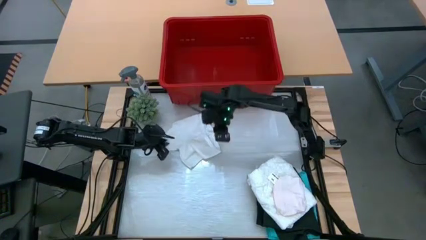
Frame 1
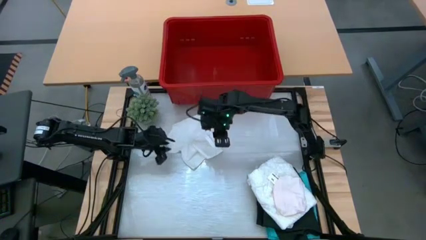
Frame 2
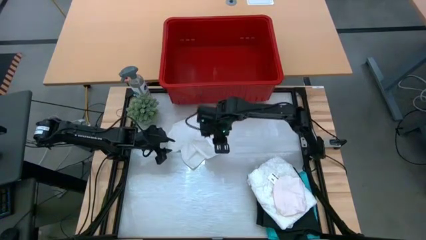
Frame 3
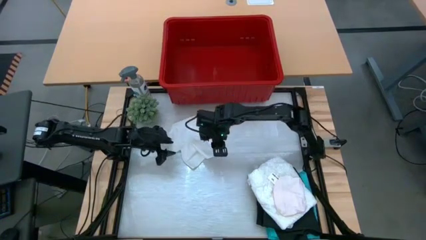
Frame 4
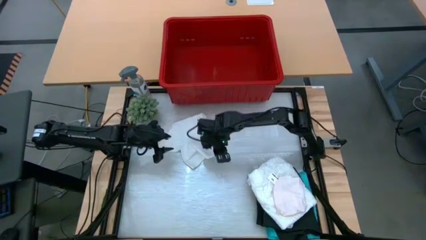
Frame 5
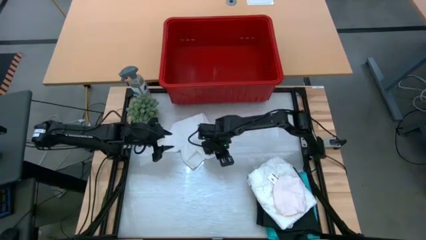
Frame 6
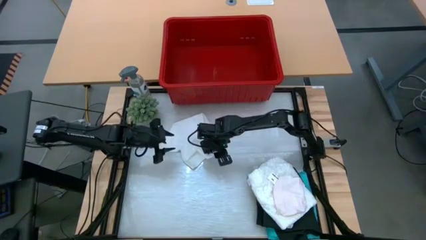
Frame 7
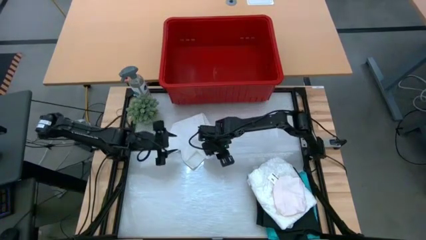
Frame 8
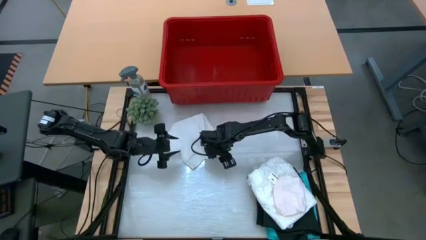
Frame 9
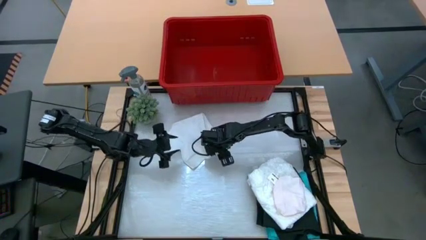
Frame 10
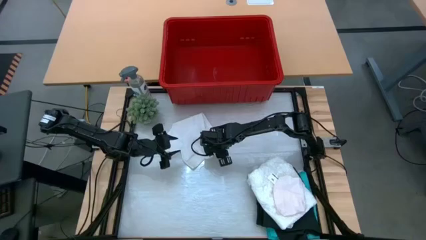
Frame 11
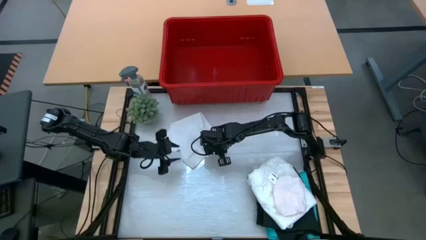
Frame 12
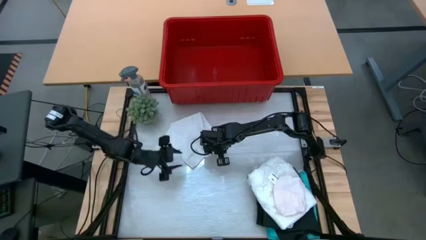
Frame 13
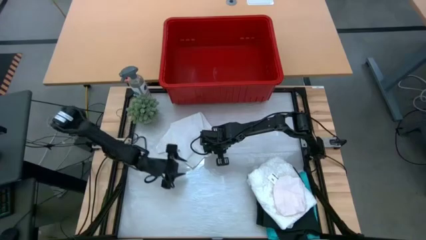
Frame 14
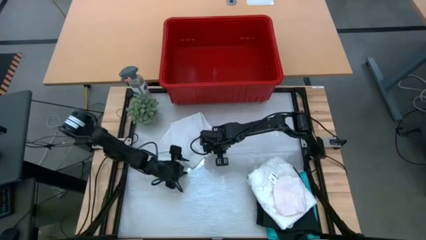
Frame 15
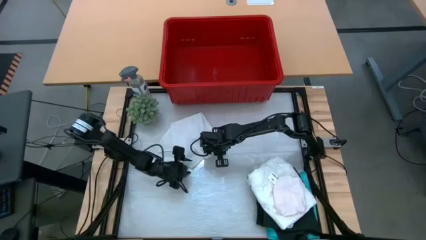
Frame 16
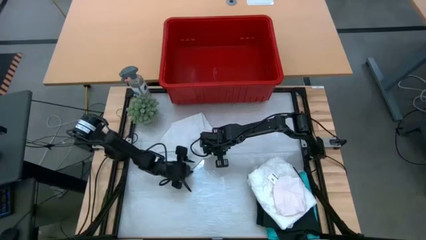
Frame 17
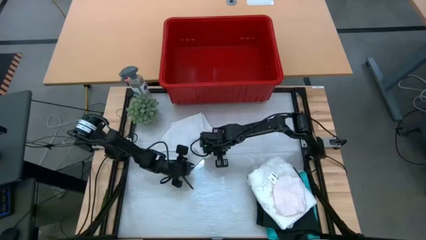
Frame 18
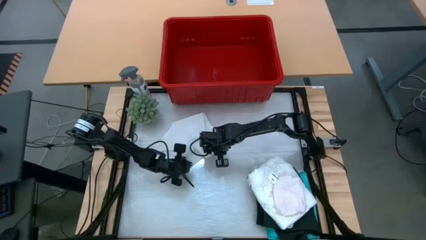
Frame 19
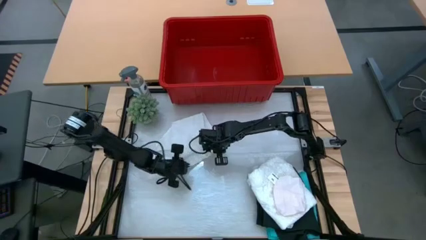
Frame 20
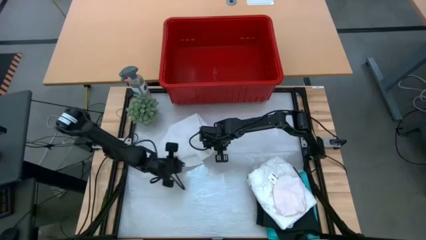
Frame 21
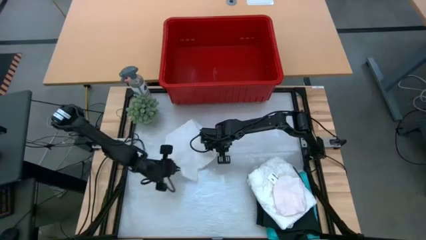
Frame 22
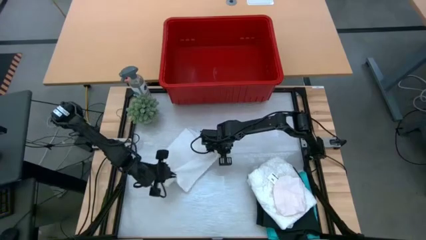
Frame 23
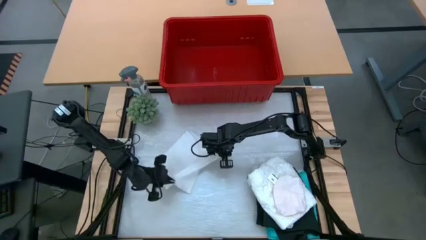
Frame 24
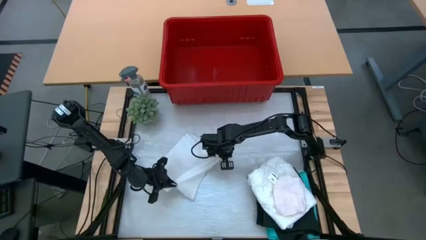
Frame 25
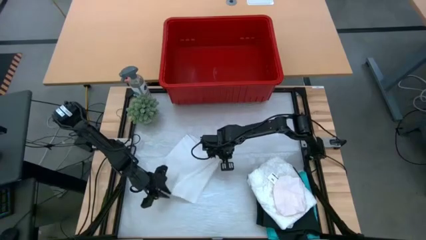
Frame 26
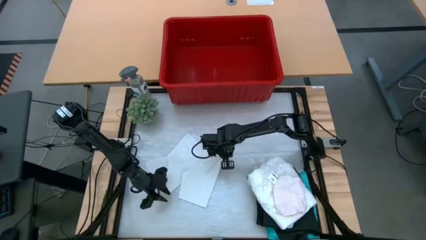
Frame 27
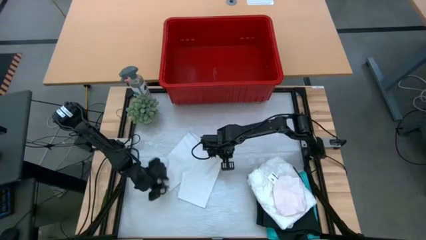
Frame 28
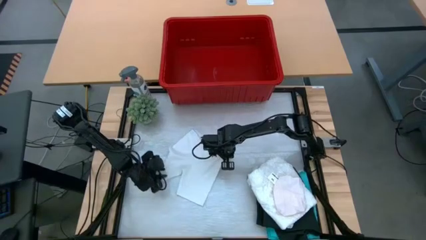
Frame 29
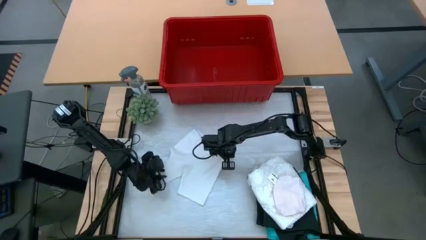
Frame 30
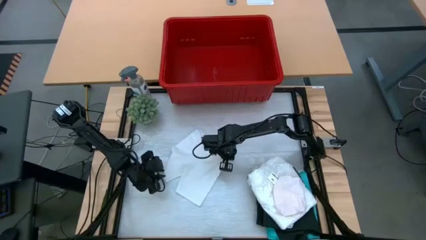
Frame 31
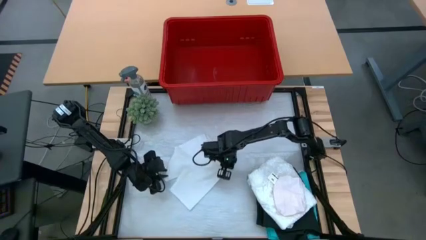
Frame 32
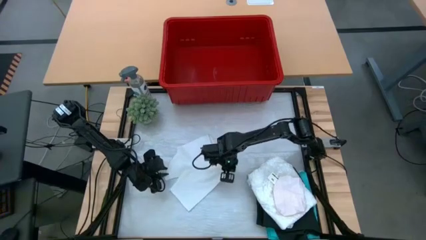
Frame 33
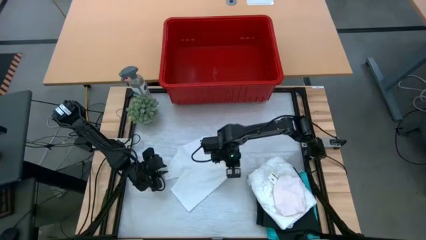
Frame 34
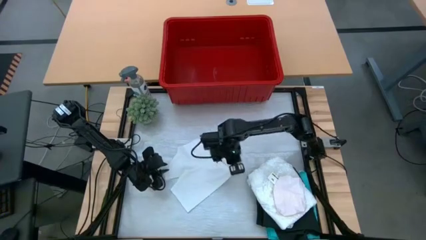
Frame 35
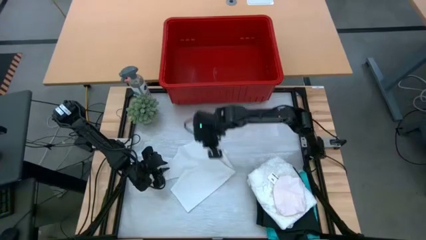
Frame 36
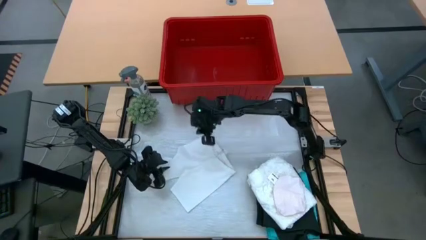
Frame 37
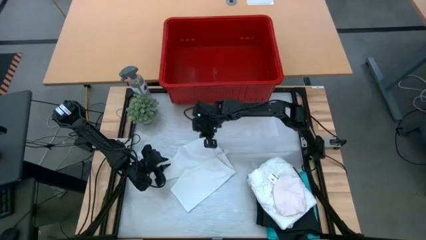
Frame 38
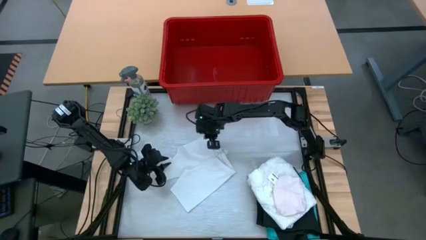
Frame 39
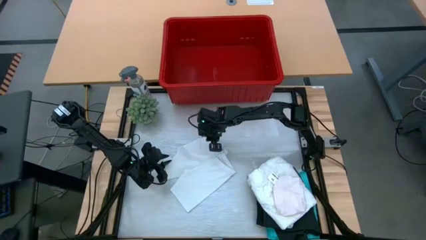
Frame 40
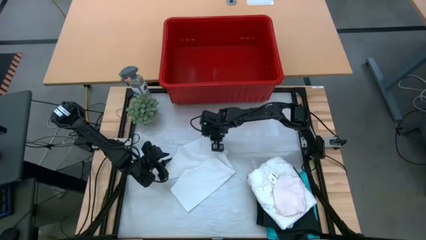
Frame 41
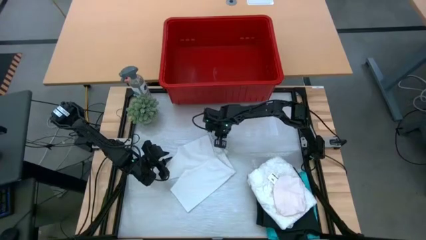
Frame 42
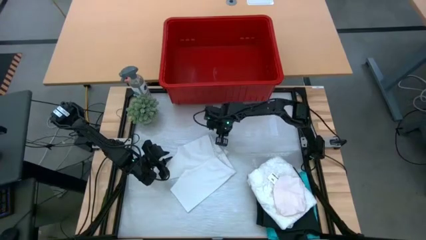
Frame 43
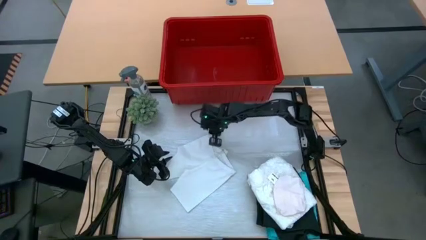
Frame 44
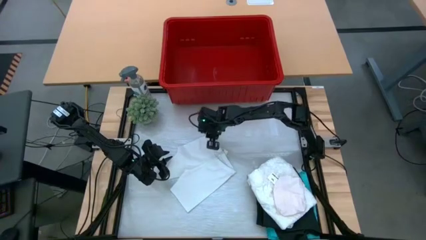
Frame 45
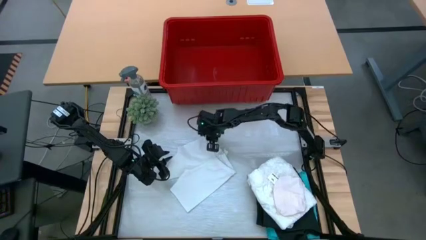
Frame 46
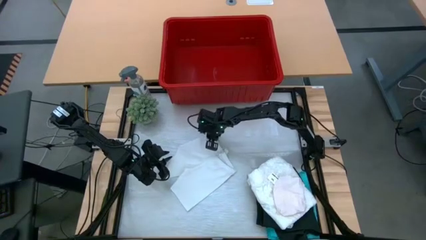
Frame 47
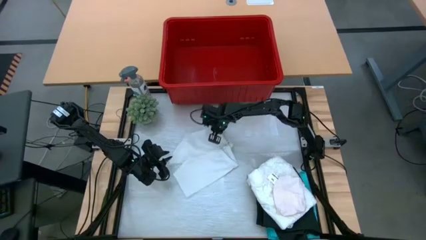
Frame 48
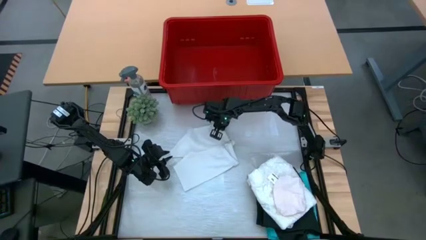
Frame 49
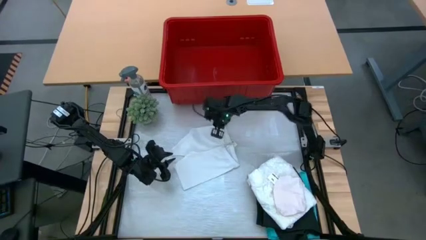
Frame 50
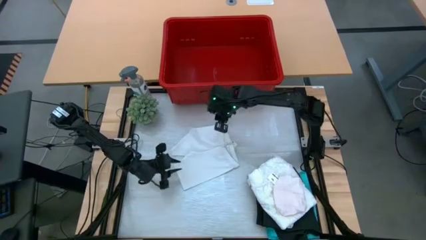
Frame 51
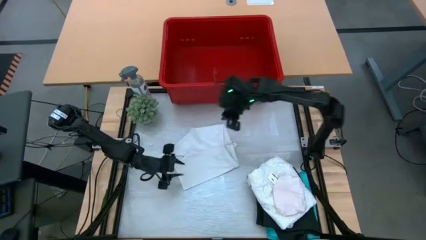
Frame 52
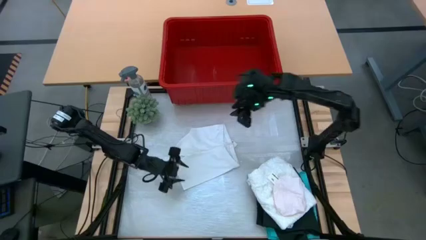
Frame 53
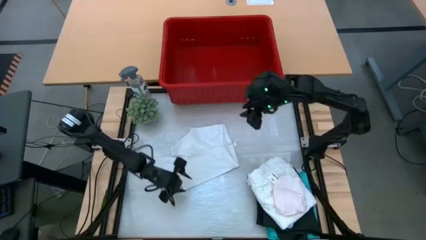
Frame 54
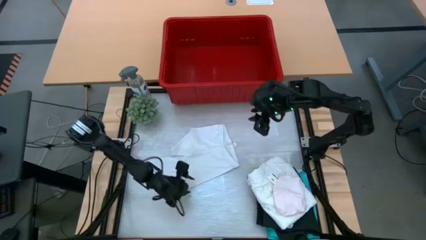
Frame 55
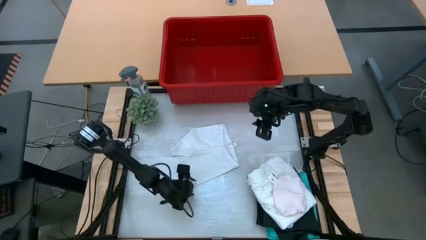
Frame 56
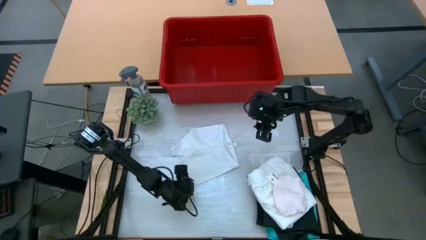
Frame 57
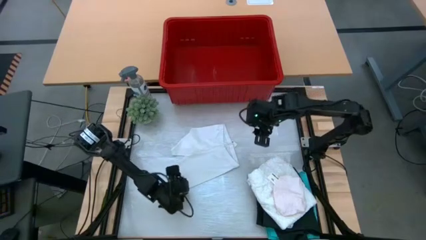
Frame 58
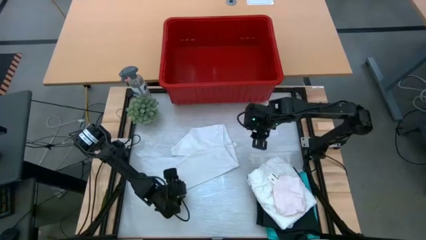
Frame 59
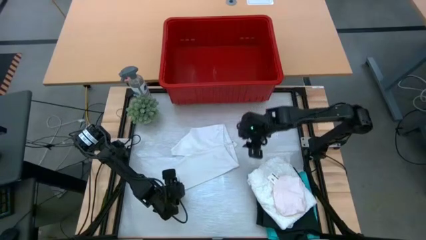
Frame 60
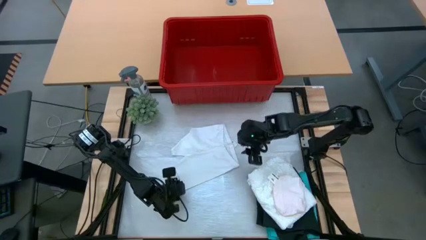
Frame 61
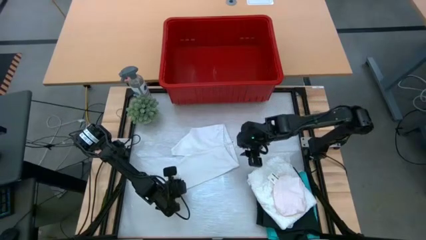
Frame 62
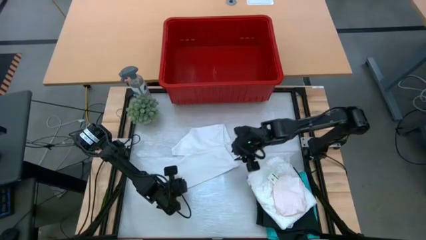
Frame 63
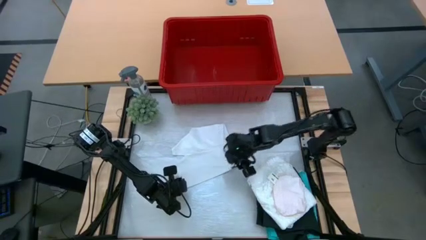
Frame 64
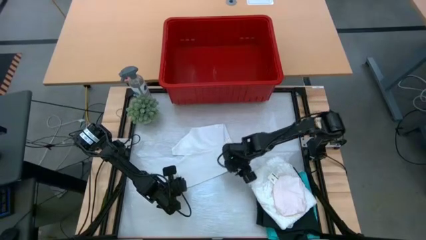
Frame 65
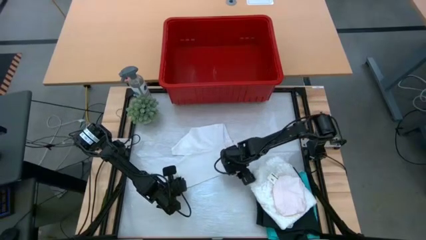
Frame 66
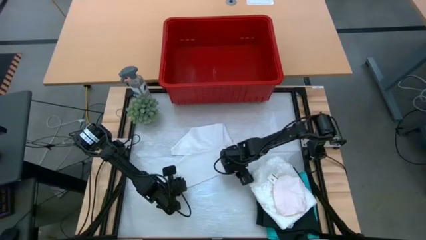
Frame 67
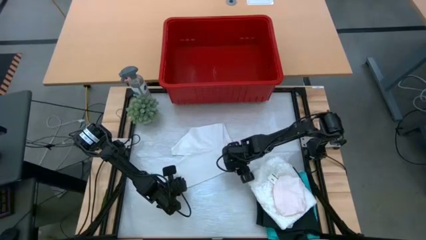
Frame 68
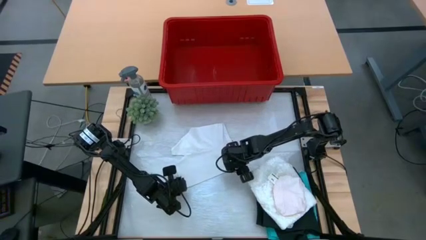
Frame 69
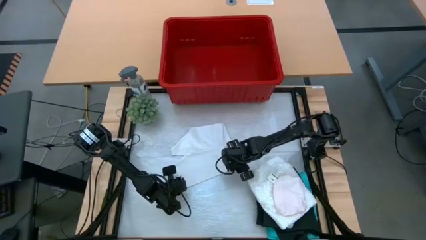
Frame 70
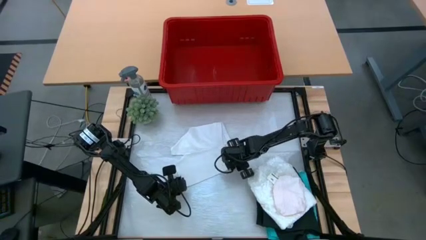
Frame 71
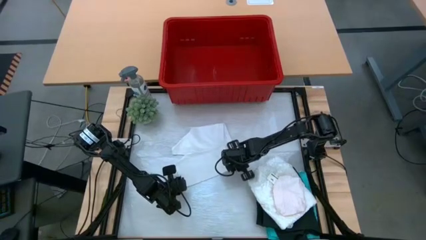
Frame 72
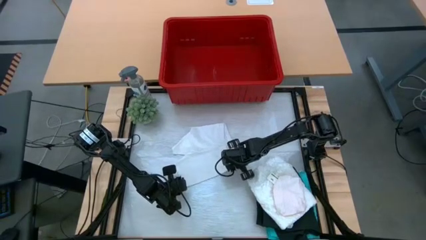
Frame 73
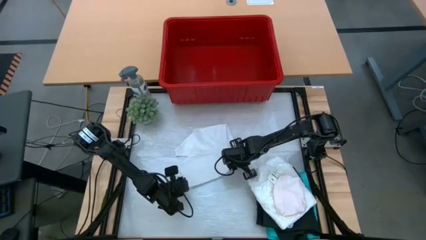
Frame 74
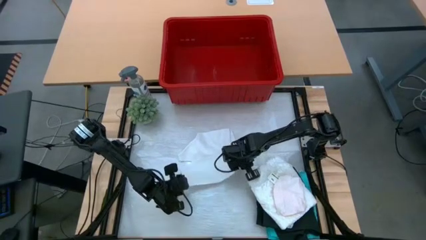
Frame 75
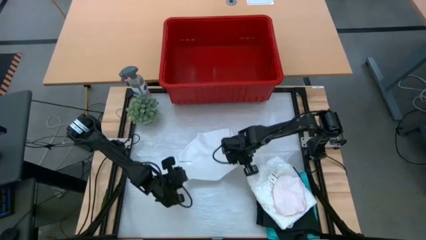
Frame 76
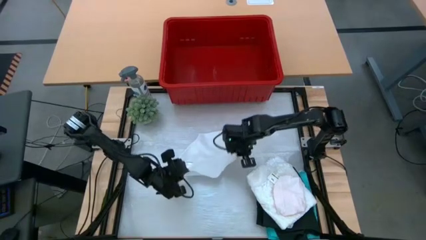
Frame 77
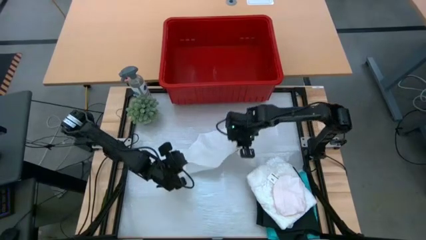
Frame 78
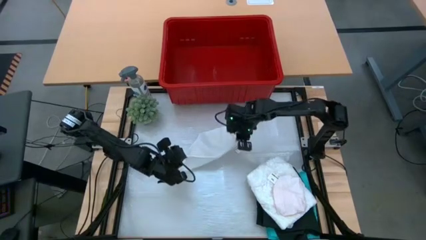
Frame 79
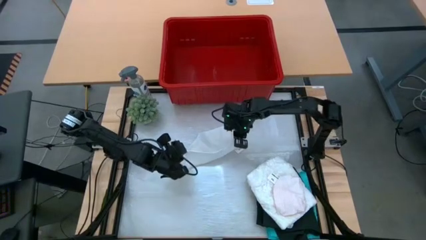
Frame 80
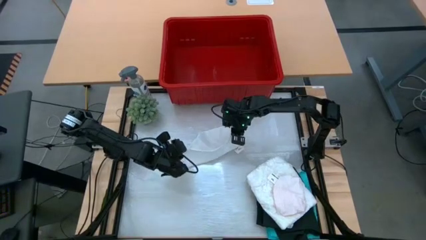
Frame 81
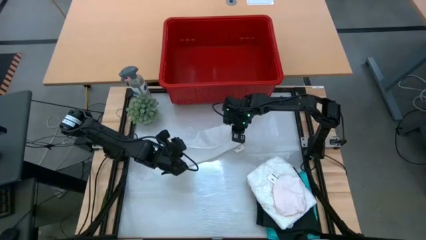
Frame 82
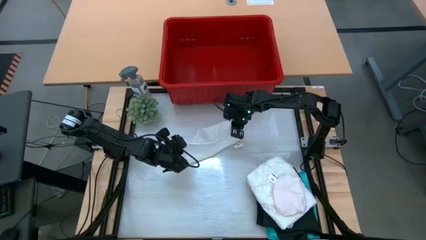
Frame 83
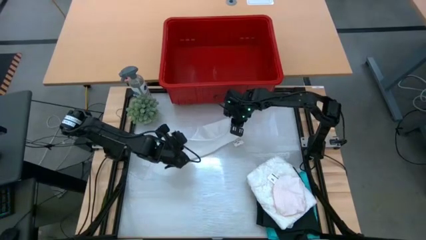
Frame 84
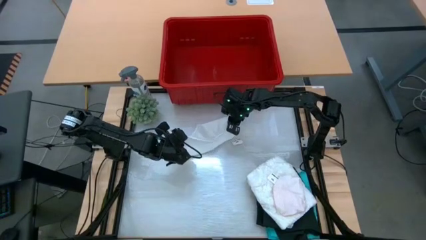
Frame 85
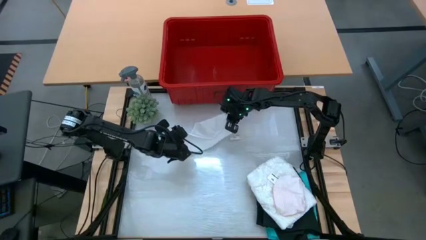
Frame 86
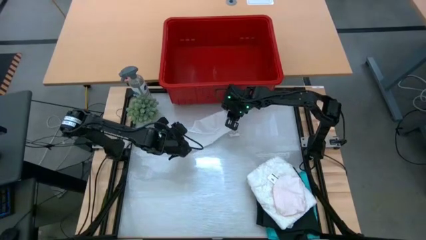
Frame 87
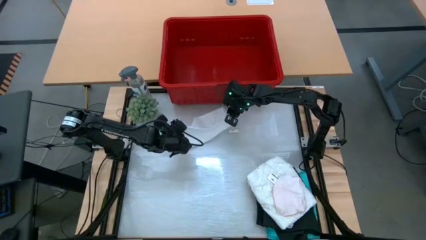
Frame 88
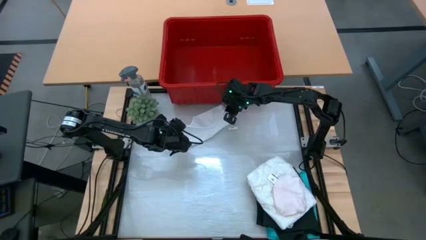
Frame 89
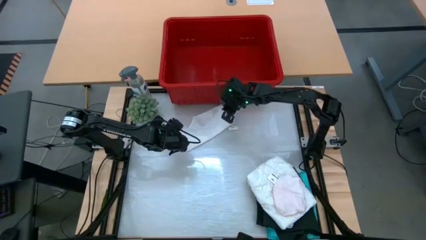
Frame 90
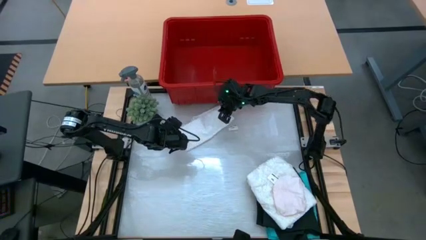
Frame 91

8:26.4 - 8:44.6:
Task: Fold Laundry from Bin
Fold the white boxers
